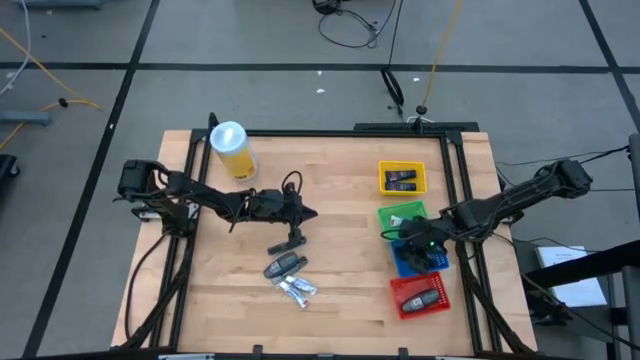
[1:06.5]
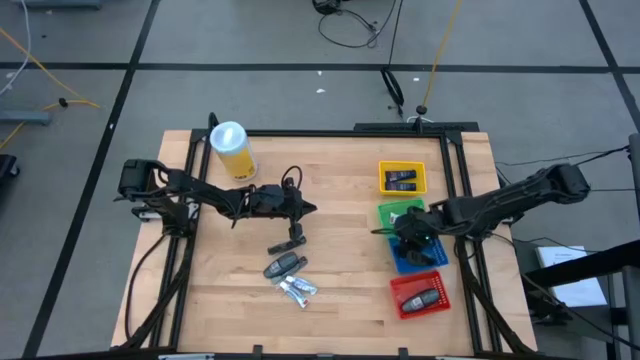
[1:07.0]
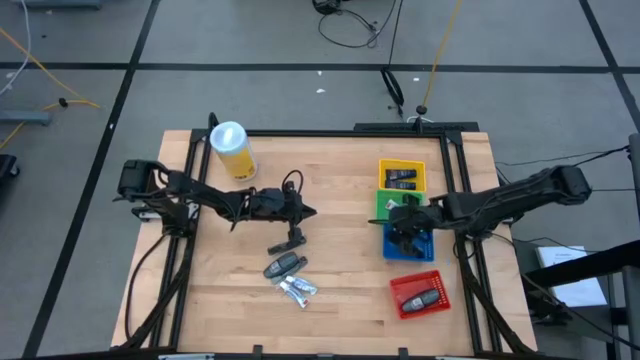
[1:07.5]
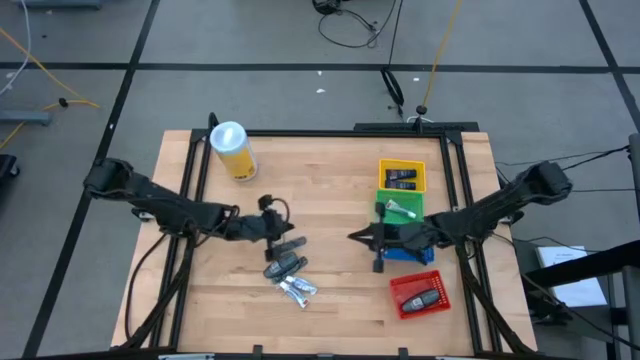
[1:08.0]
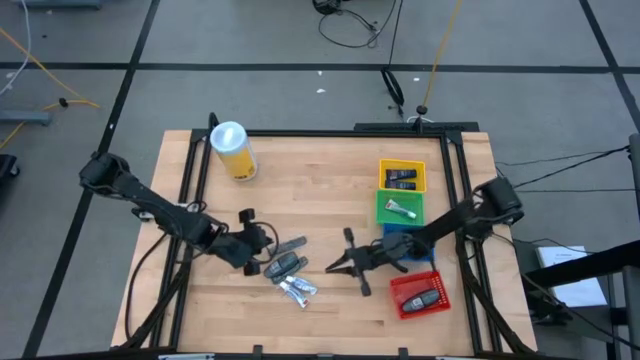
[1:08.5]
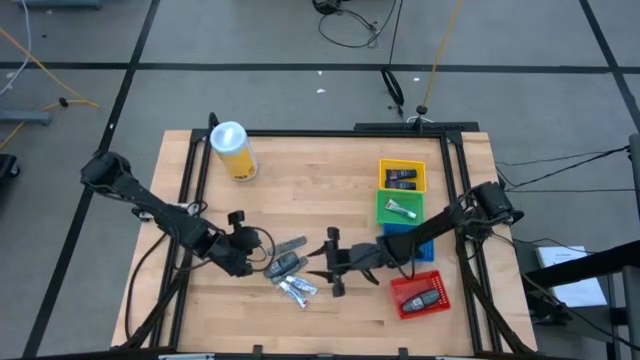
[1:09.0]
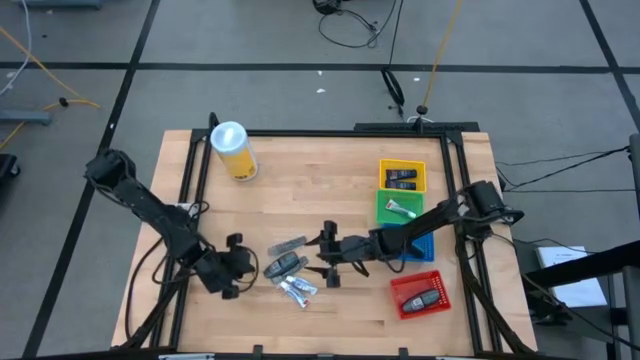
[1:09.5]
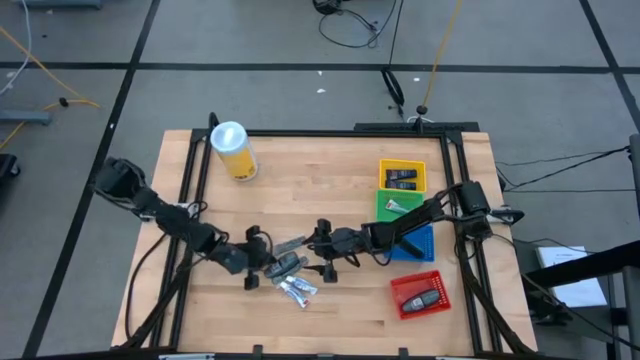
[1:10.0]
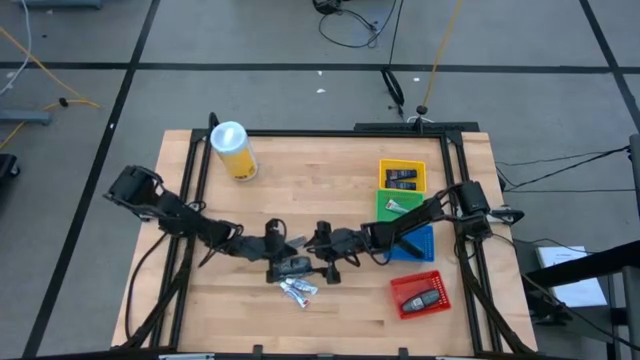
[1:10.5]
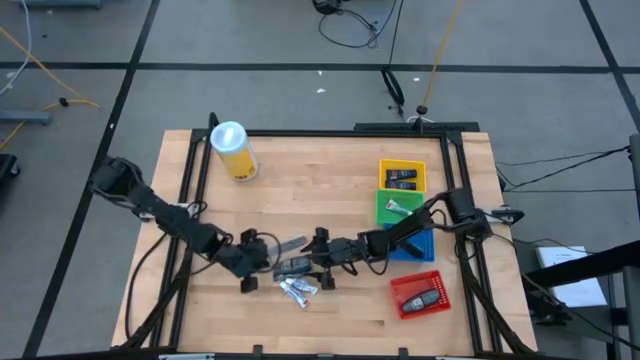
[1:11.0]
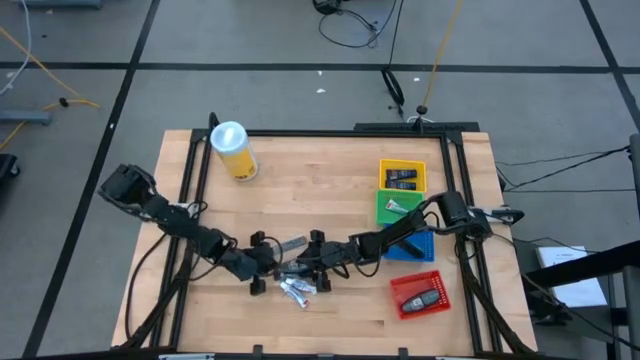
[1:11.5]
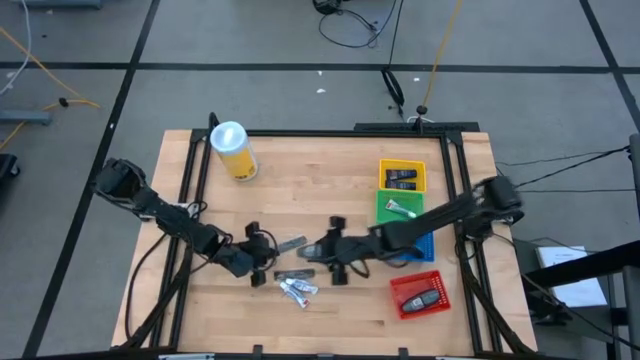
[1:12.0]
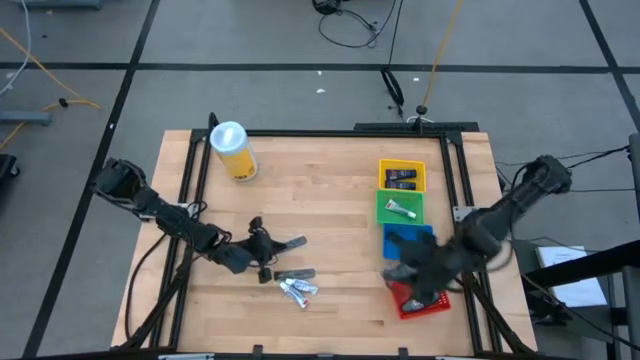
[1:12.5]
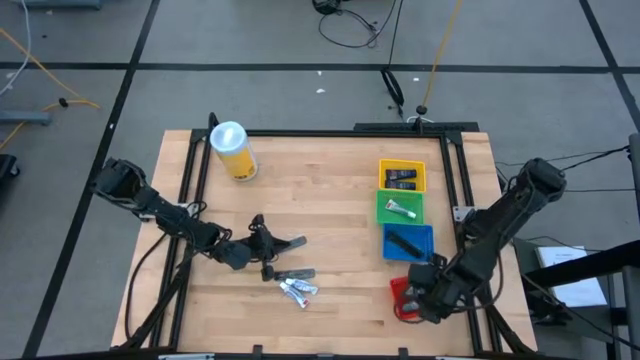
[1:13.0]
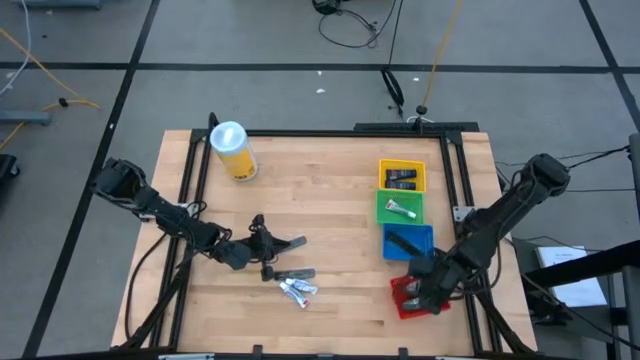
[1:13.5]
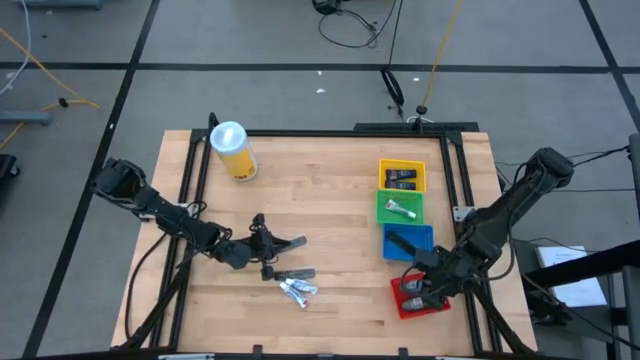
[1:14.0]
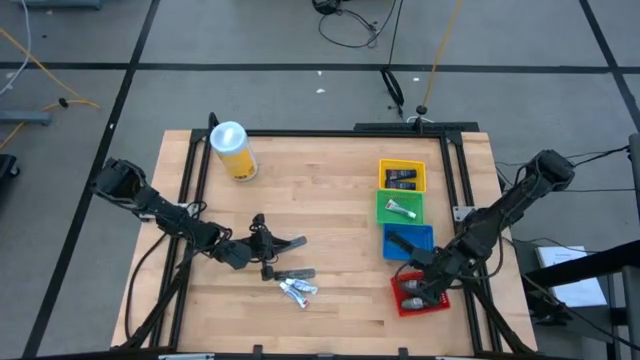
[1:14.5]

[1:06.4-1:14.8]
Task: Pick & Place Travel size toiletries
Put the gray deodorant roll on into the orange bin

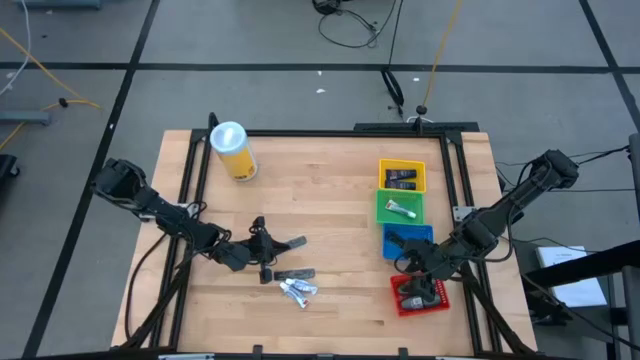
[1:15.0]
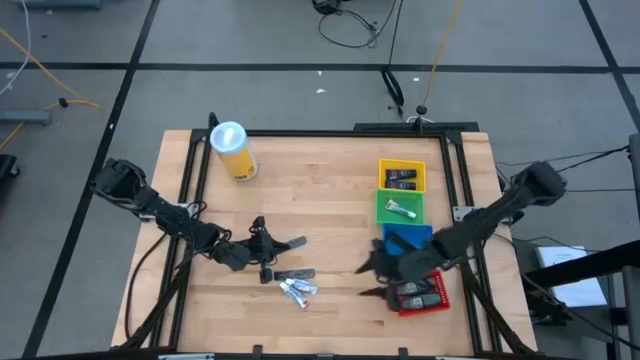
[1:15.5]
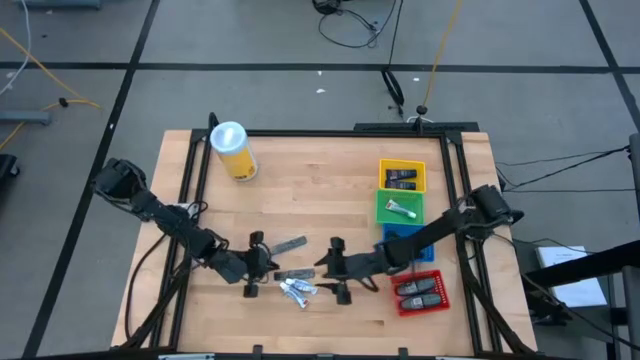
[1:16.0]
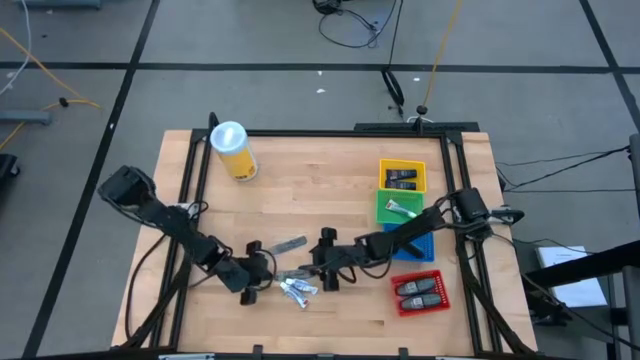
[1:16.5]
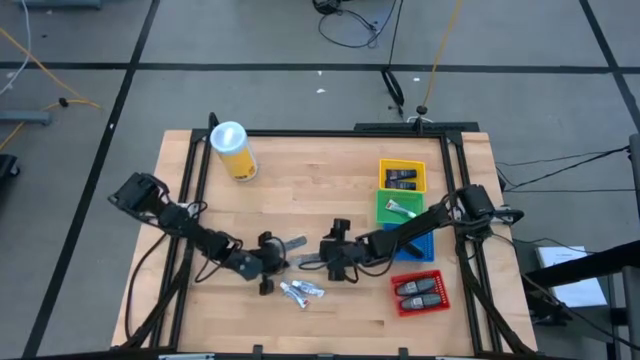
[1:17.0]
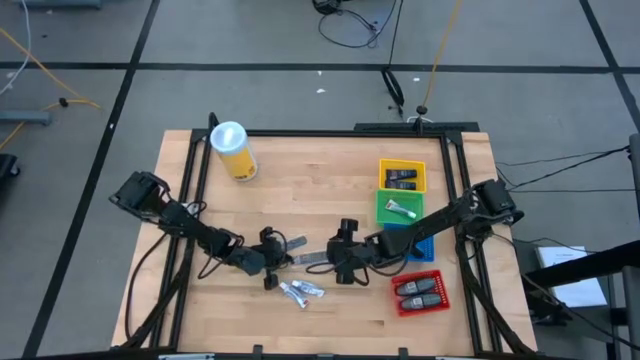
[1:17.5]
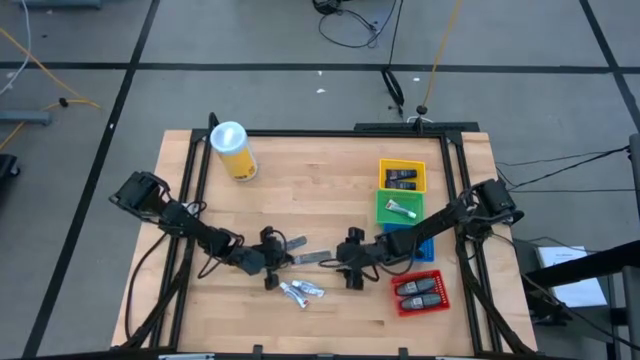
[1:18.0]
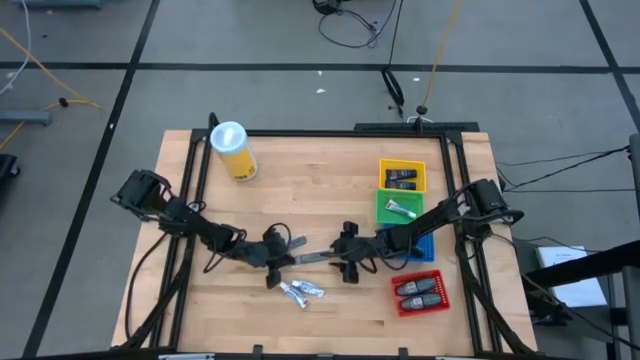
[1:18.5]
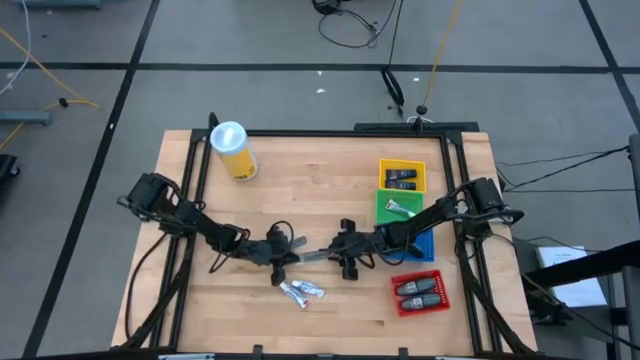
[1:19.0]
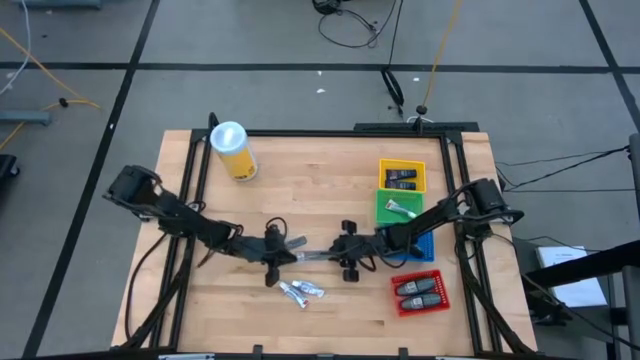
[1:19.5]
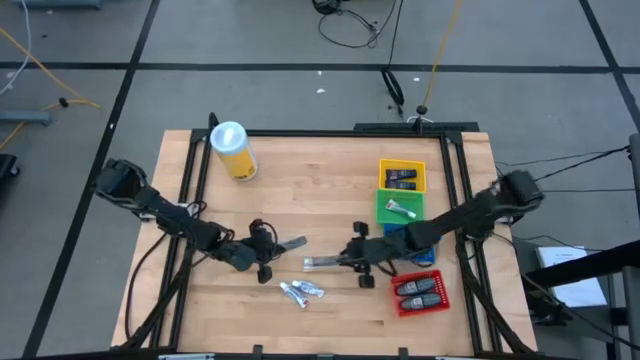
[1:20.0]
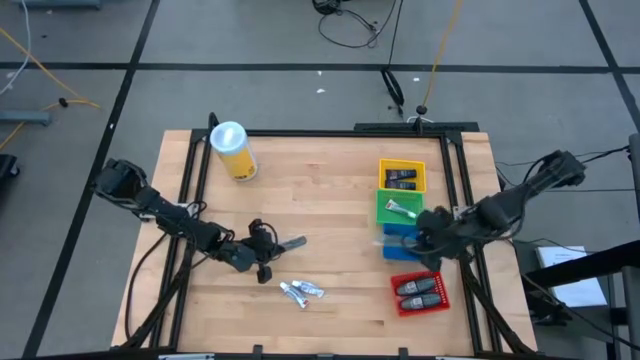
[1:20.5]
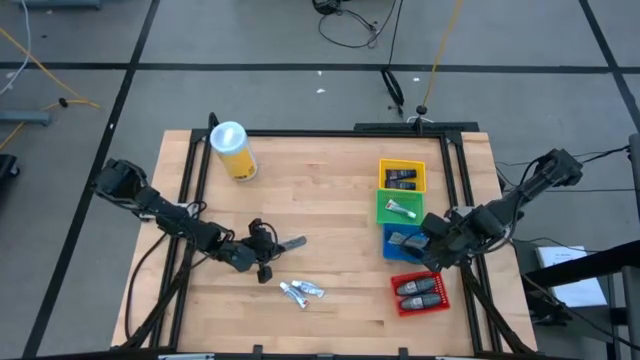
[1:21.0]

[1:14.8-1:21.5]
Put the black hair comb into the orange bin

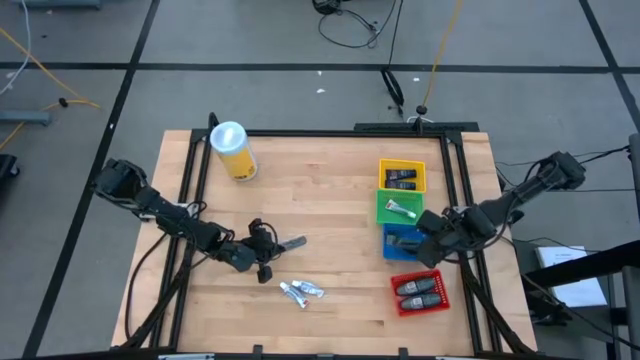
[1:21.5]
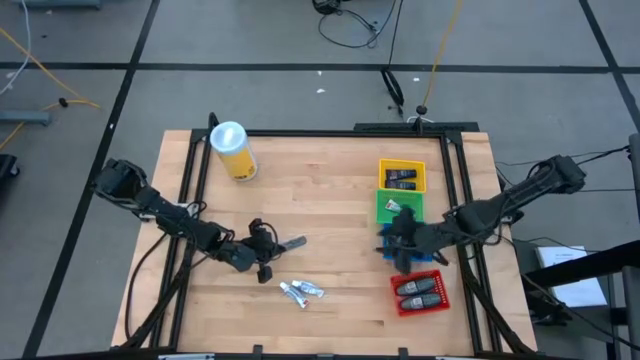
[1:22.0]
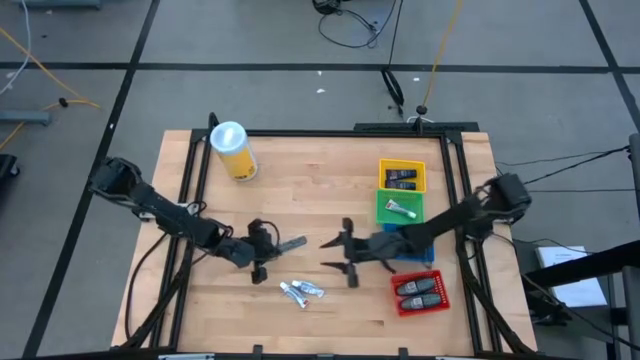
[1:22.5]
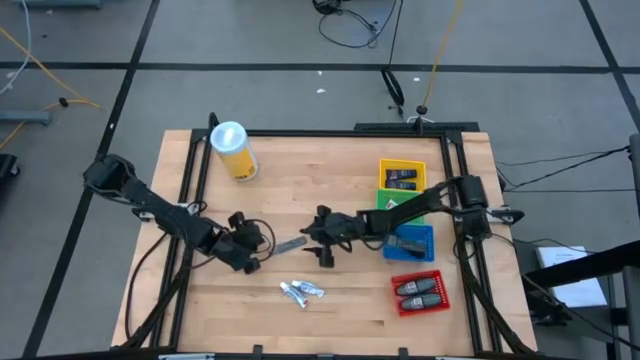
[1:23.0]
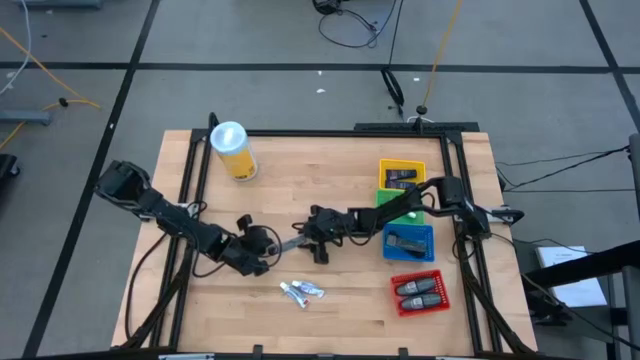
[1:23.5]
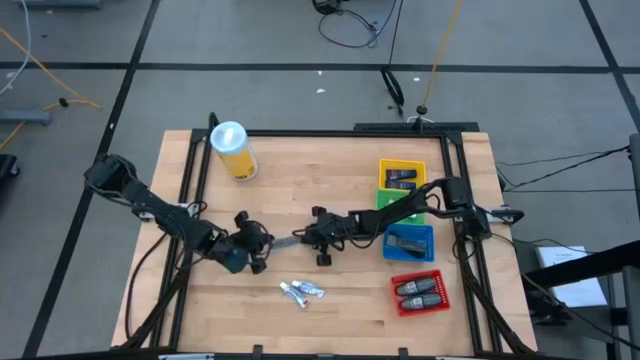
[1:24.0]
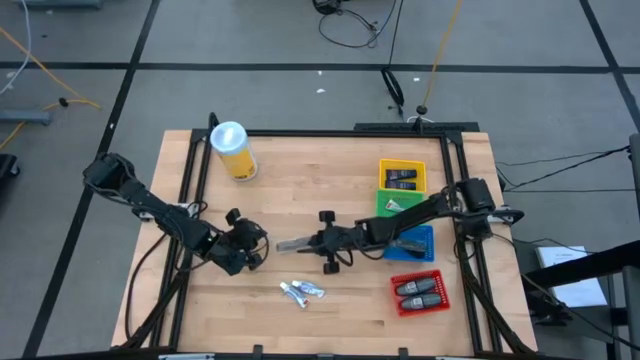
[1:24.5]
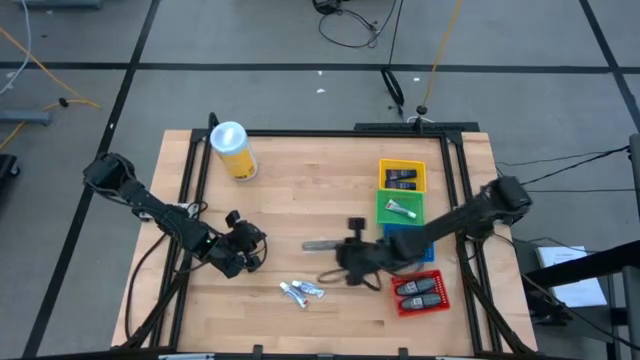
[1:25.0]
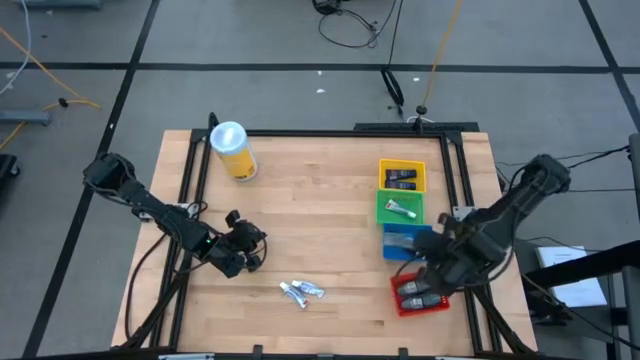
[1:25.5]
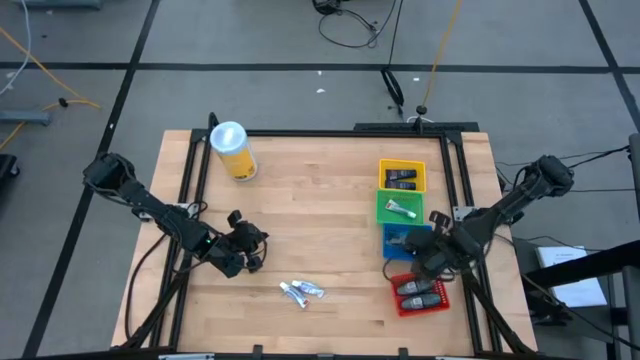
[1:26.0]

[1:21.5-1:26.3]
Put the black hair comb into the orange bin

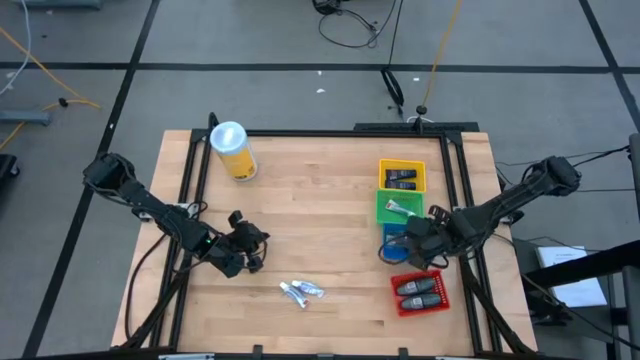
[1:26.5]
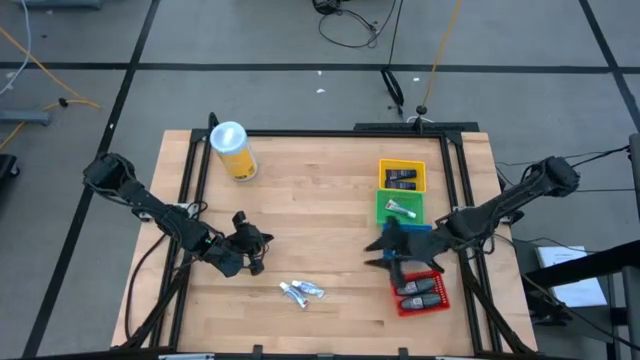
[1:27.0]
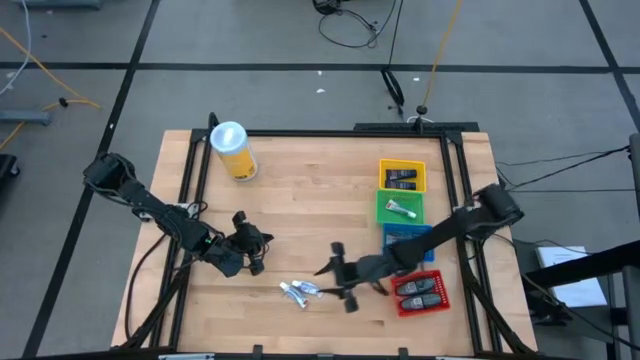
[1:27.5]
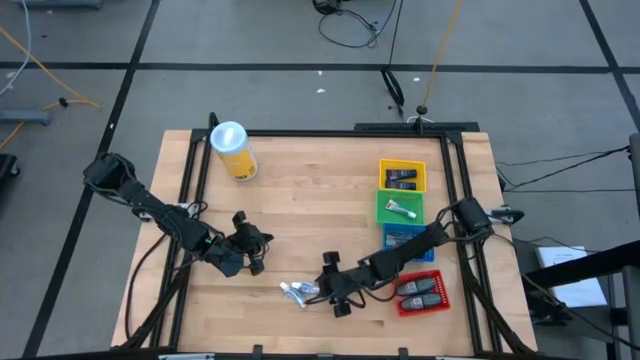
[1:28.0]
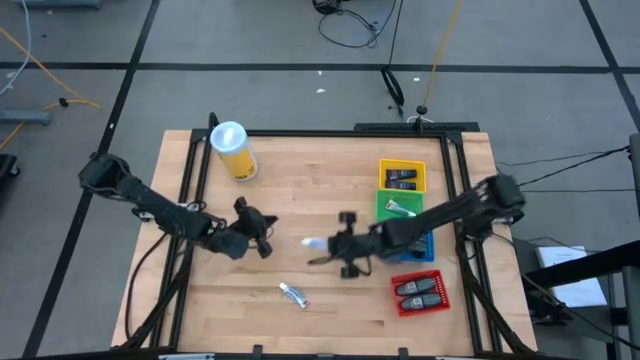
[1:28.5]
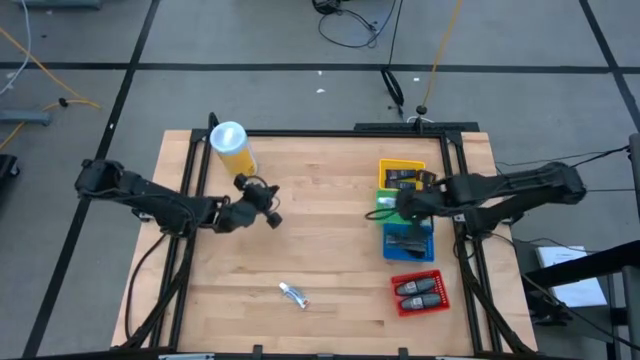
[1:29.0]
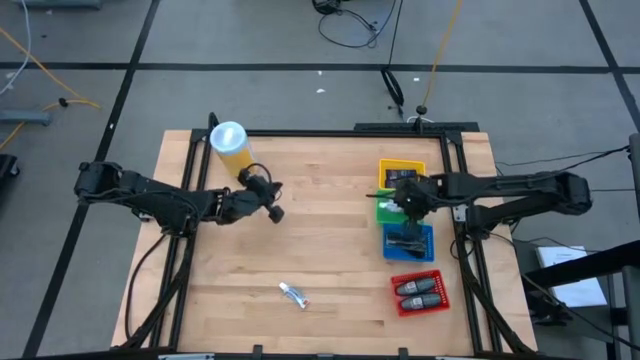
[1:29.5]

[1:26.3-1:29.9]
Put the white toothpaste into the green bin
